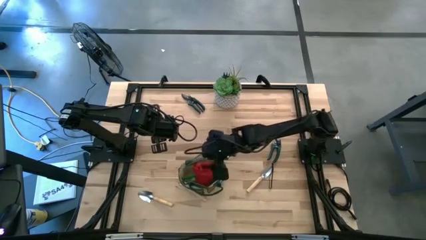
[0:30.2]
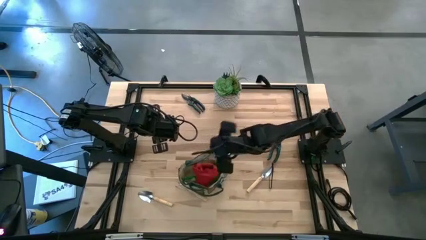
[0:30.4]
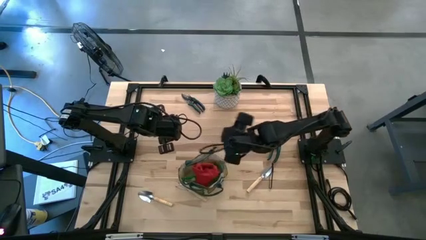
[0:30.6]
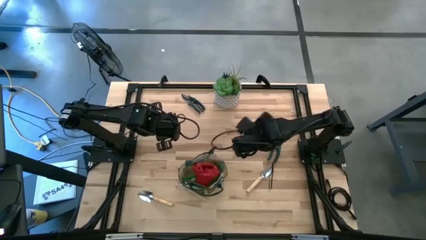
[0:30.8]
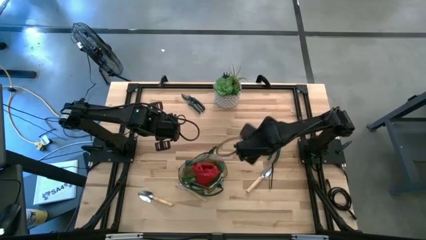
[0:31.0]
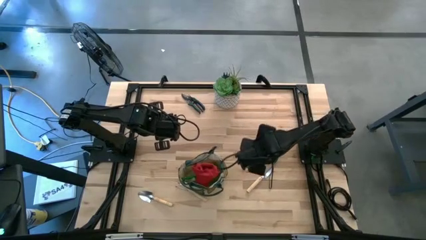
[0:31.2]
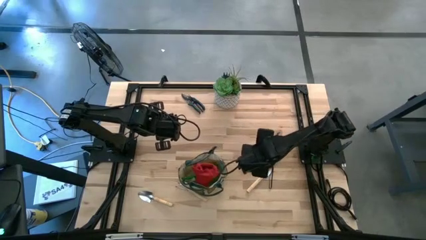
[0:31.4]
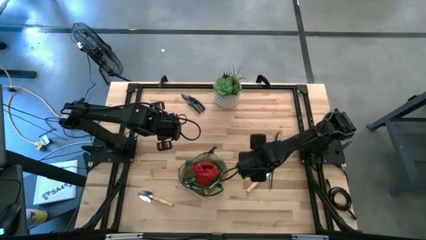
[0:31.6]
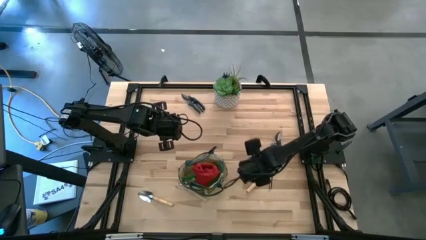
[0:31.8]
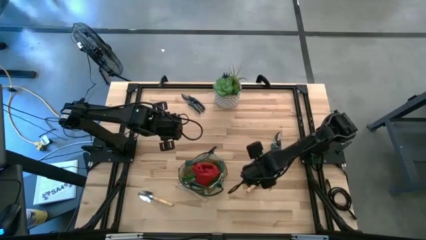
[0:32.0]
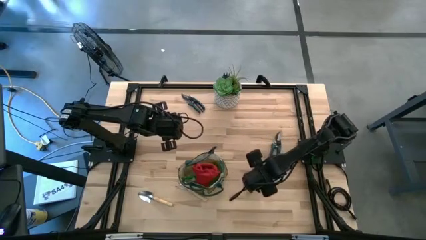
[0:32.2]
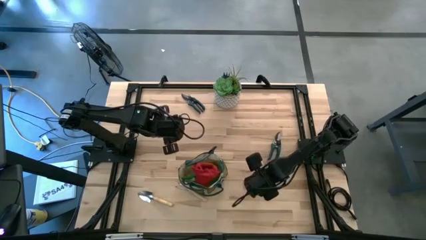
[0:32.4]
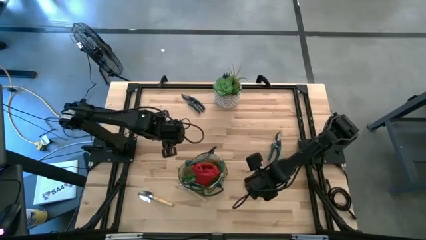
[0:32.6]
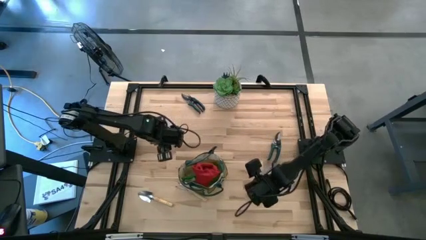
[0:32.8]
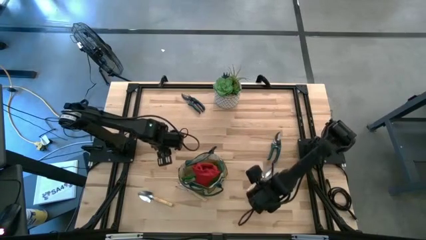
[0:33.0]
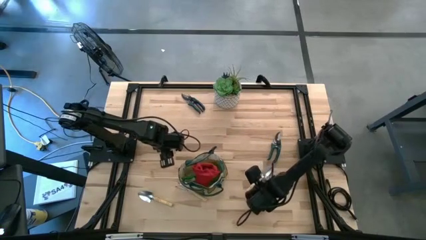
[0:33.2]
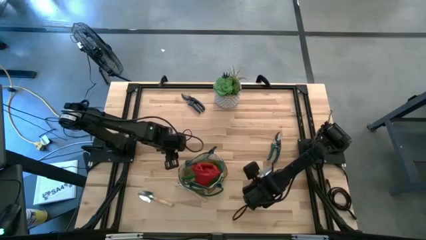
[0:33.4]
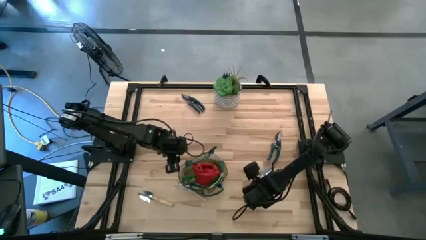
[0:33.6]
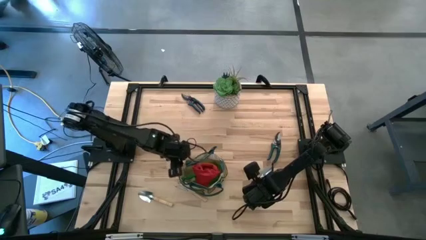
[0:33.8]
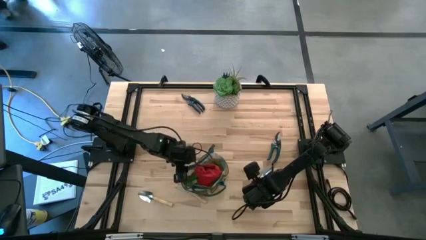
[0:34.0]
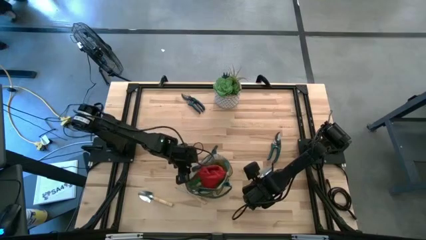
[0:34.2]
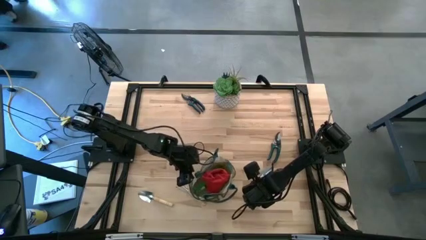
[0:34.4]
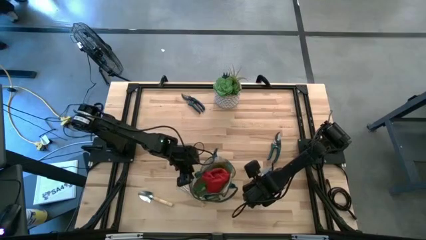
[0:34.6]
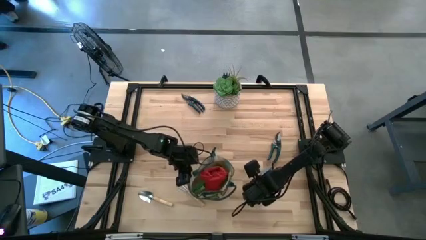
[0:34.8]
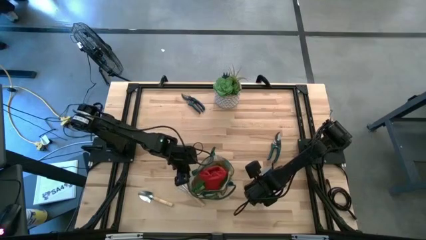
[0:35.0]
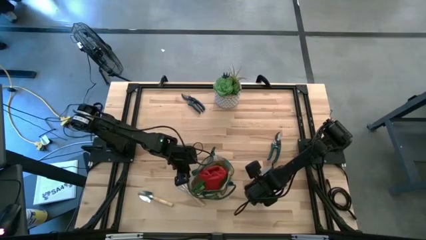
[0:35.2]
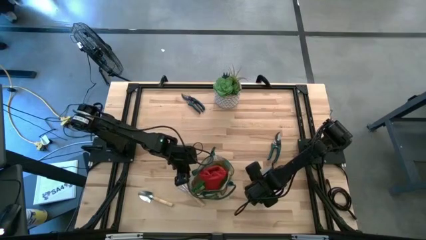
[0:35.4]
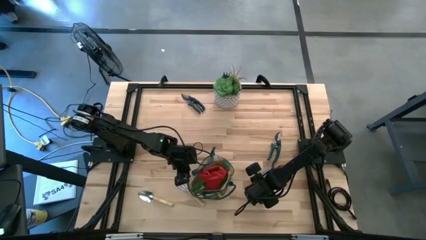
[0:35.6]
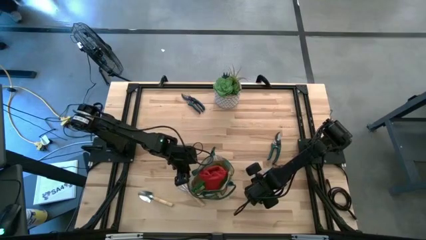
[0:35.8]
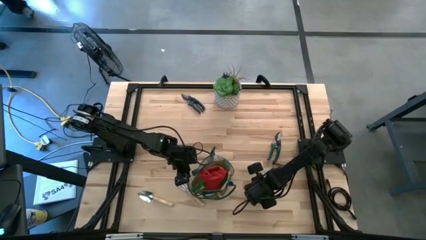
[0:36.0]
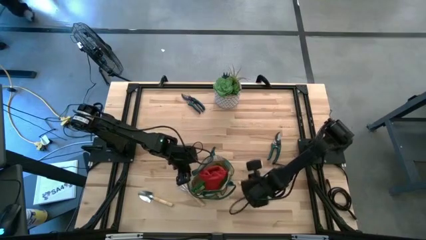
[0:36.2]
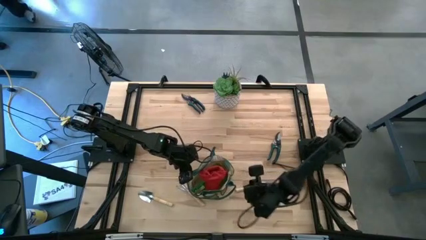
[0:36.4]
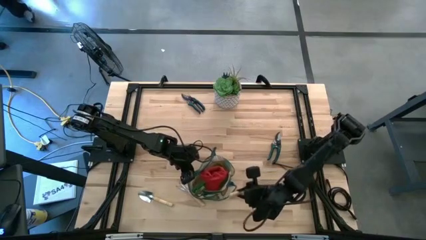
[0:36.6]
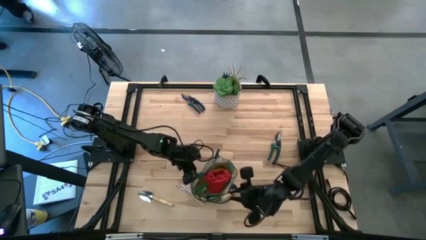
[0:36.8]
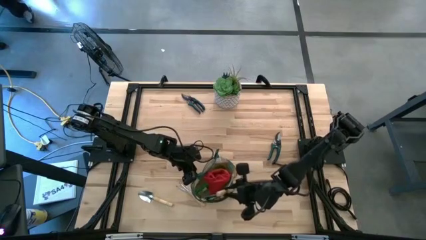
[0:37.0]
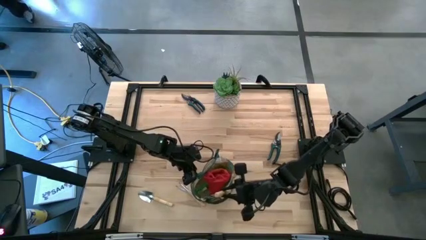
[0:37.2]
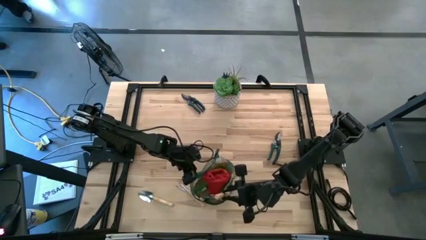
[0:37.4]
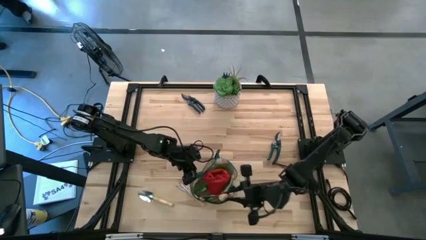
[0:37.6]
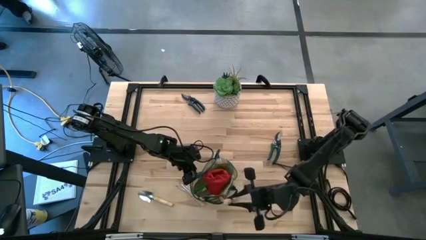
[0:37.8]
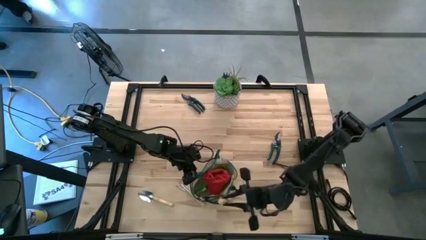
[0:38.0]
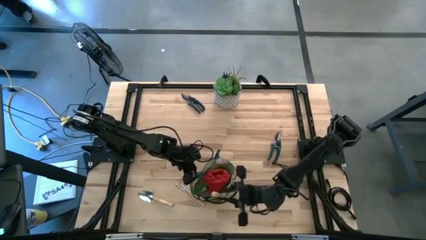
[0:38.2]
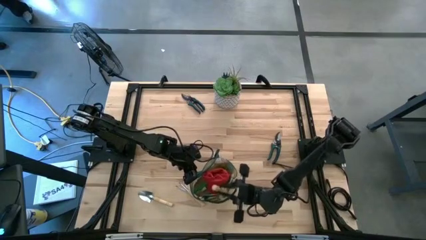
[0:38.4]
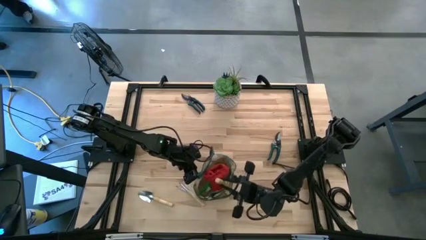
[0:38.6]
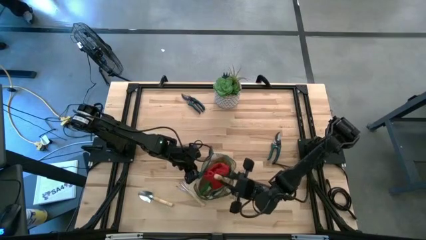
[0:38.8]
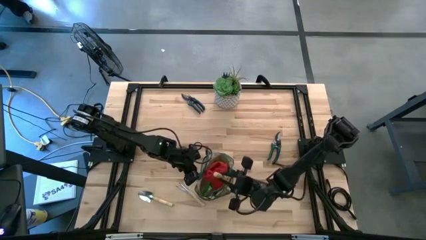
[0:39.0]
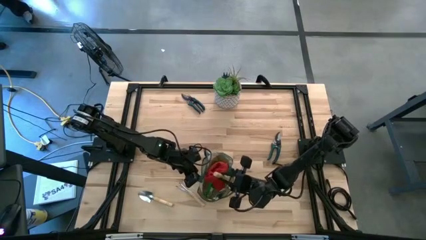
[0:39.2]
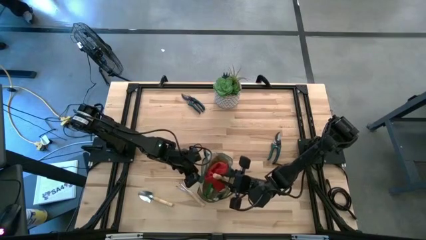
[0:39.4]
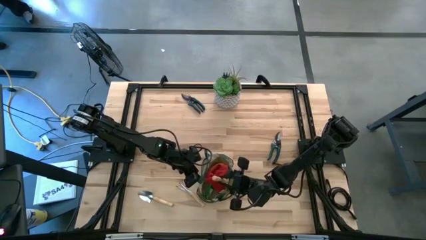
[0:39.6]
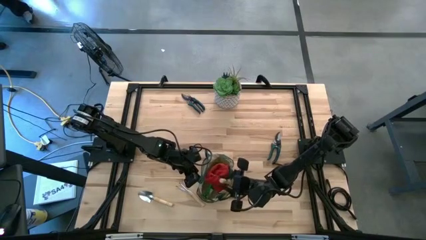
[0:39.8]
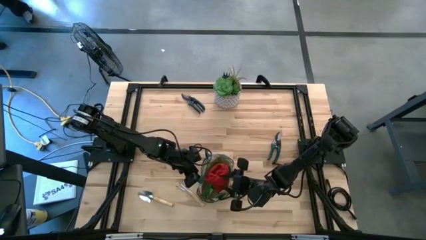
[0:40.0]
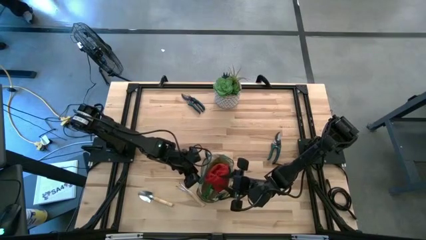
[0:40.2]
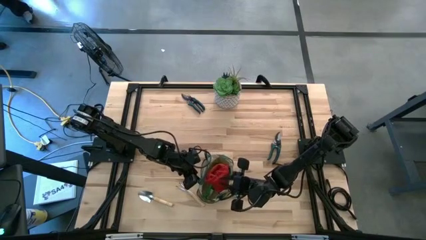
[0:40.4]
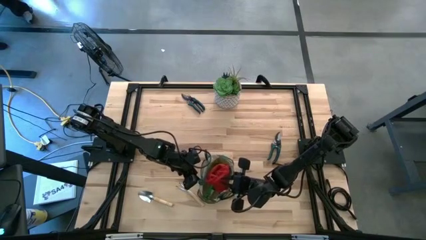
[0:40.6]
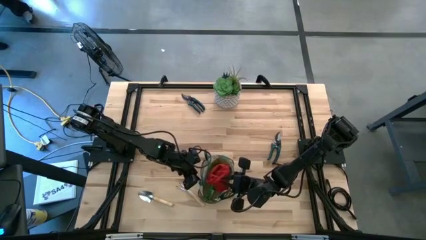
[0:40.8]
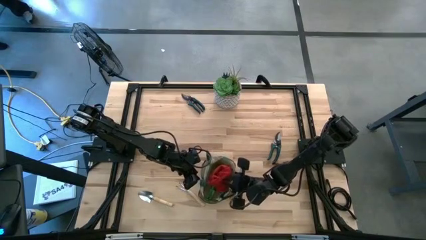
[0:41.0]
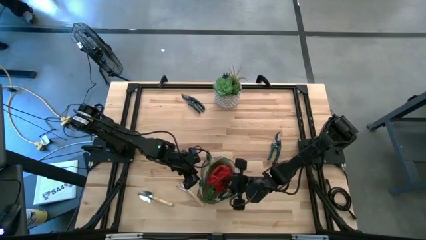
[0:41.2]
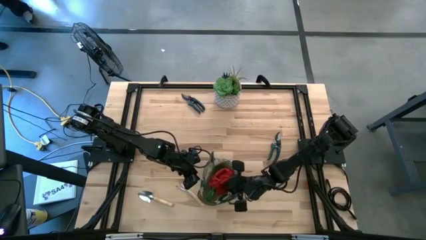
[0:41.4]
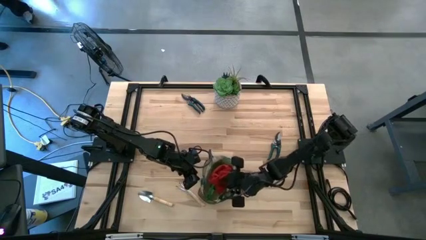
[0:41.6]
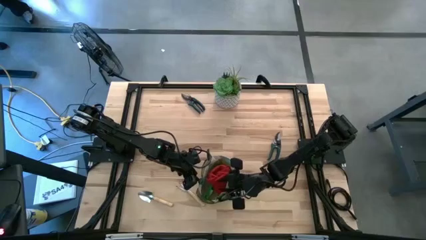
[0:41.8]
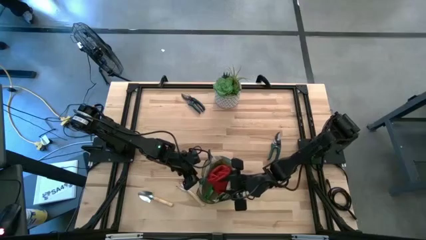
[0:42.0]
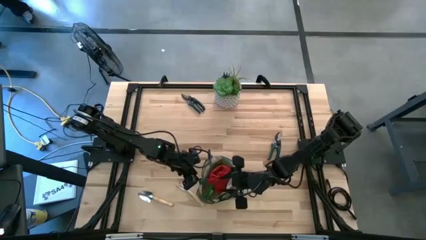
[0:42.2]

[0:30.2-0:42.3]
Task: Pick & Place Garden tools in Gardening bag
Put the light brown trowel into the white gardening bag

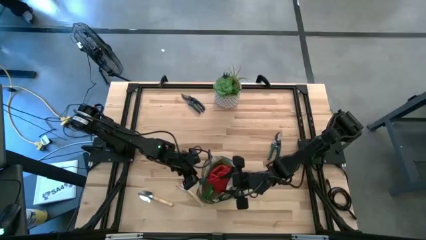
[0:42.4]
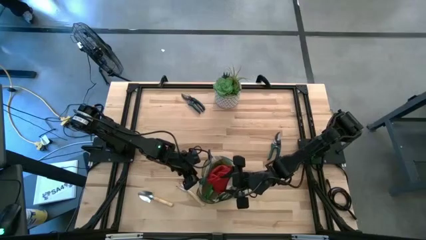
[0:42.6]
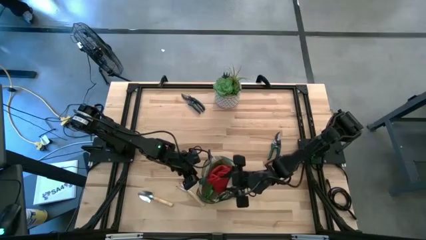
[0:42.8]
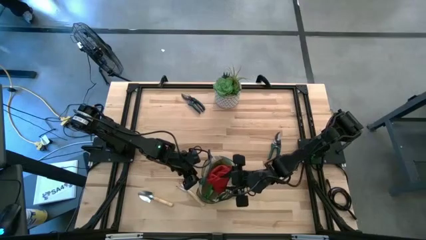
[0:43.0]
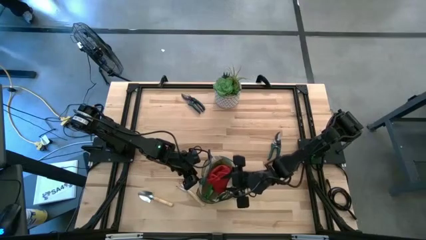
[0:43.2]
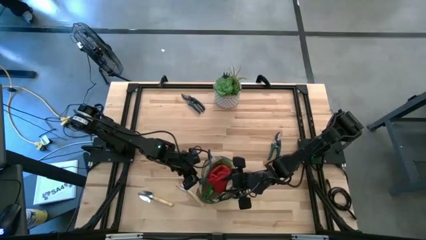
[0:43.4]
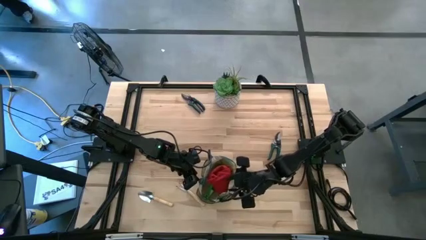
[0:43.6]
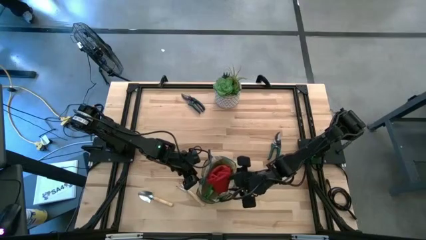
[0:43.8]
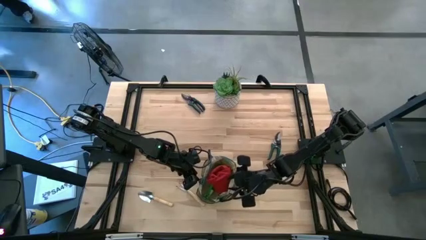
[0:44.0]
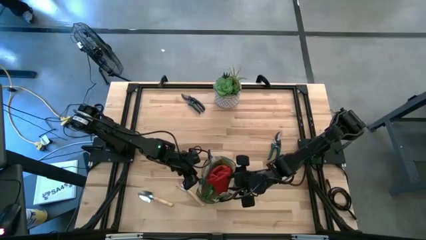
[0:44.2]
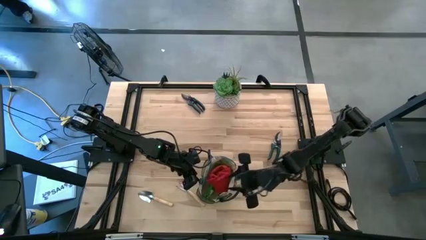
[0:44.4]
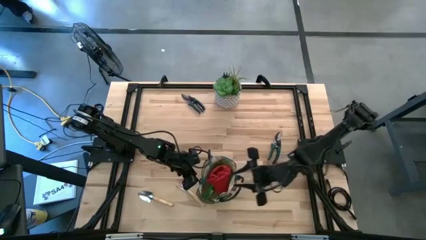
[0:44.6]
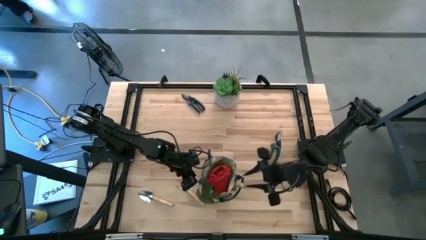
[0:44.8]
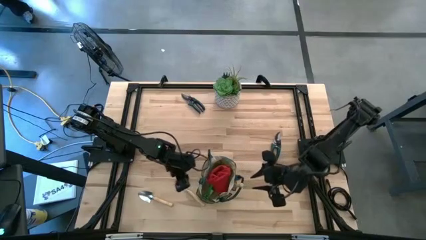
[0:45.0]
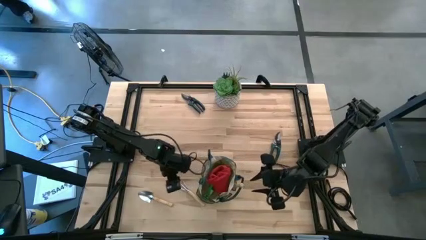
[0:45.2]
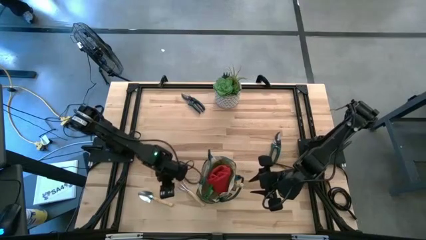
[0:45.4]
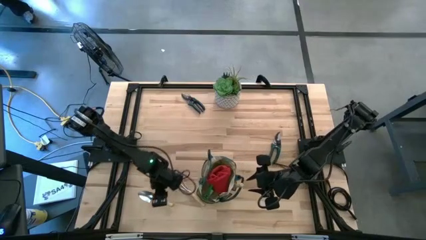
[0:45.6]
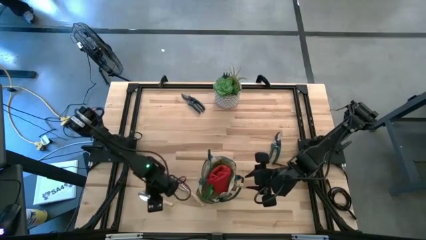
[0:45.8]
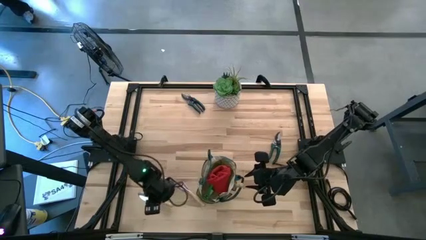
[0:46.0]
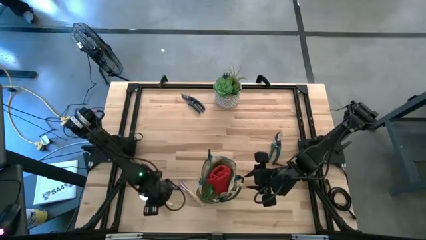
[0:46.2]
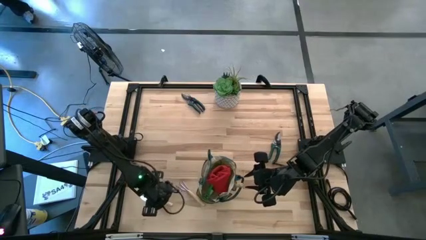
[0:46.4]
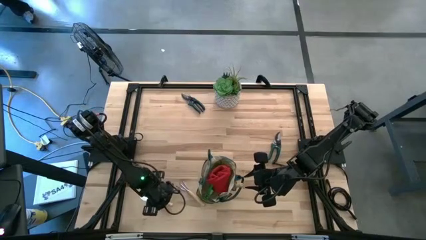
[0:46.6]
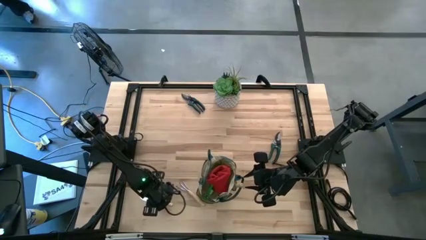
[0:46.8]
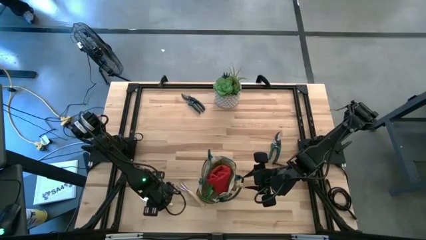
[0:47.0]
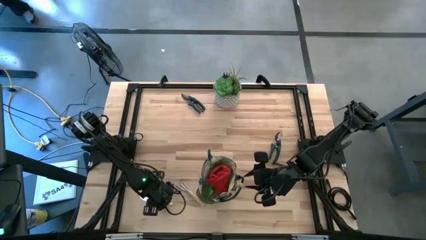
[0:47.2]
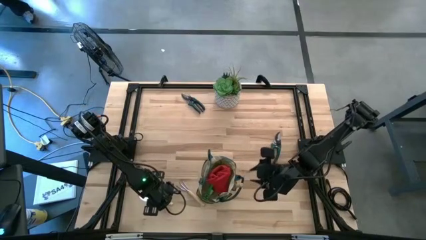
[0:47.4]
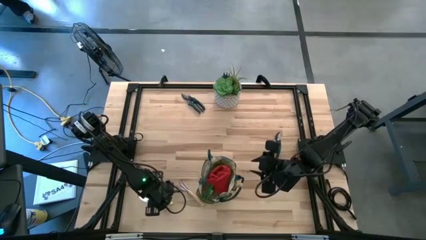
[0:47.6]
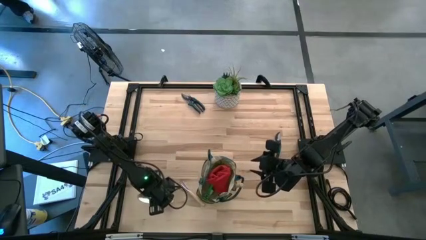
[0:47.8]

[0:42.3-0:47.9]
Put the light brown trowel into the white gardening bag
